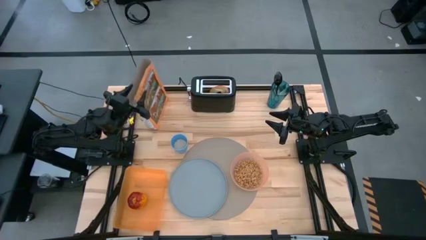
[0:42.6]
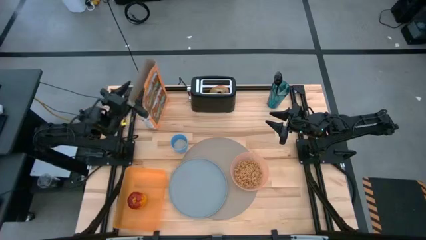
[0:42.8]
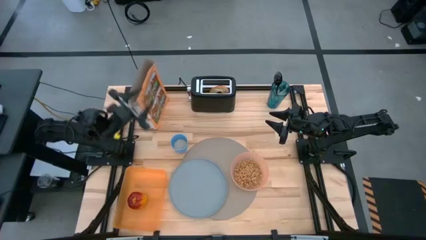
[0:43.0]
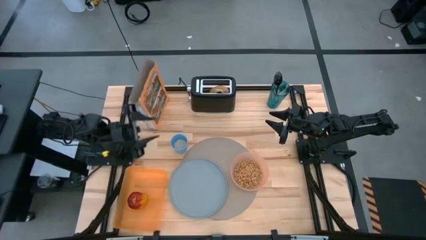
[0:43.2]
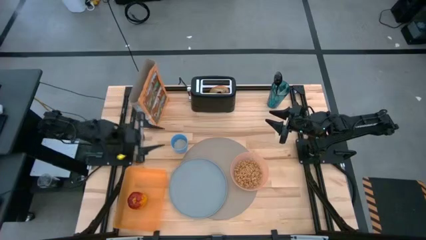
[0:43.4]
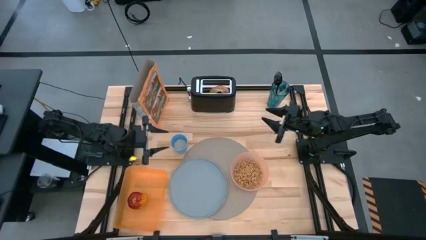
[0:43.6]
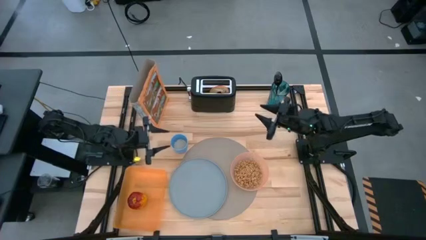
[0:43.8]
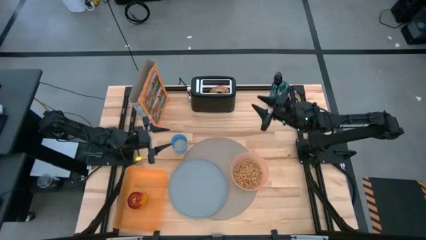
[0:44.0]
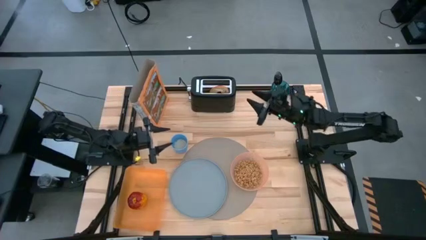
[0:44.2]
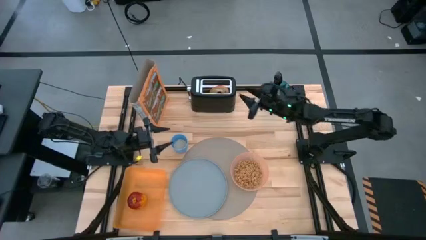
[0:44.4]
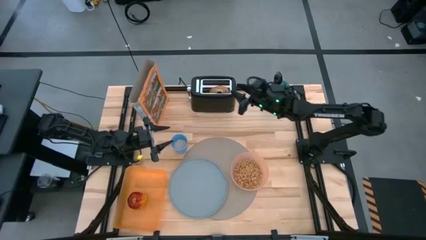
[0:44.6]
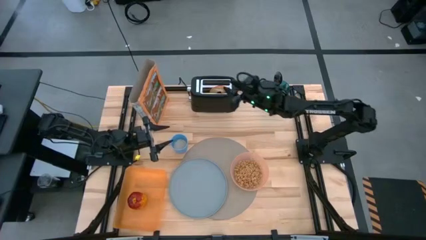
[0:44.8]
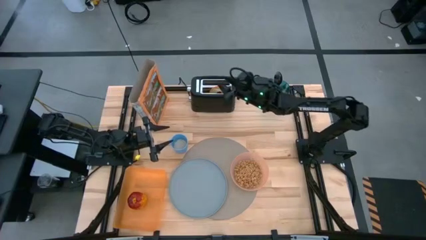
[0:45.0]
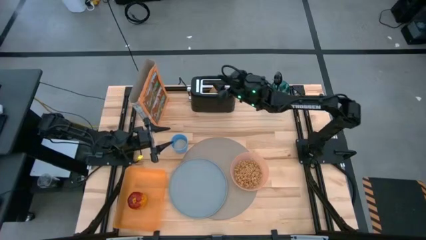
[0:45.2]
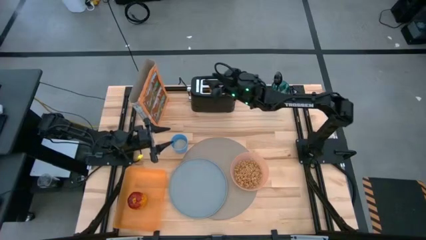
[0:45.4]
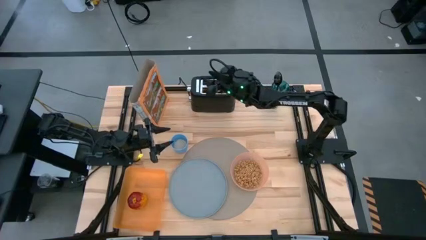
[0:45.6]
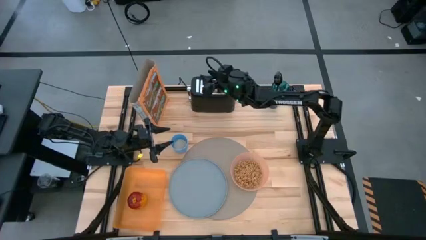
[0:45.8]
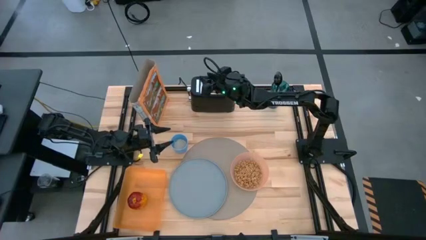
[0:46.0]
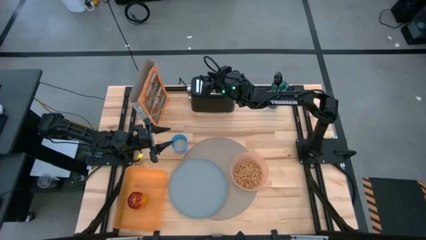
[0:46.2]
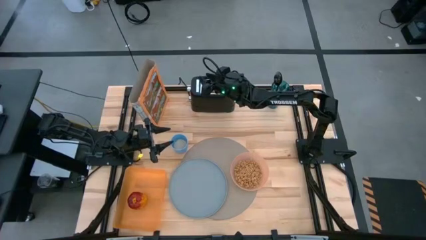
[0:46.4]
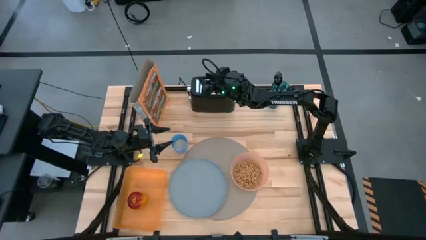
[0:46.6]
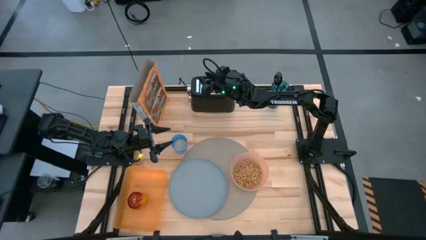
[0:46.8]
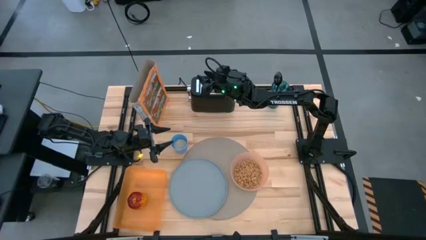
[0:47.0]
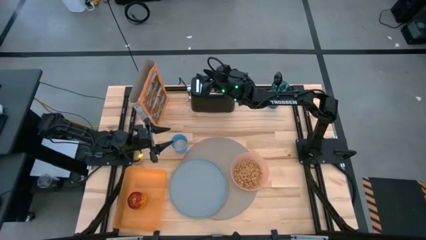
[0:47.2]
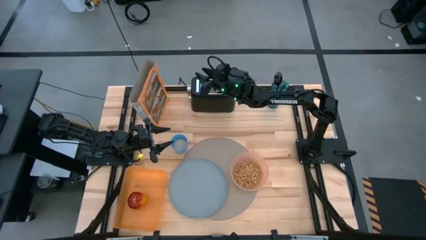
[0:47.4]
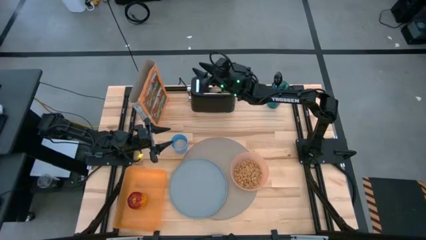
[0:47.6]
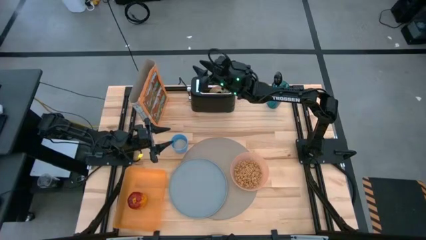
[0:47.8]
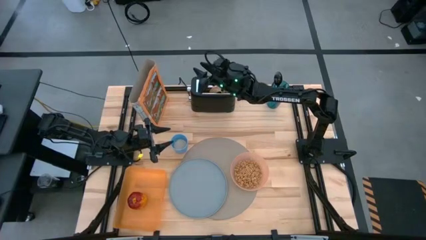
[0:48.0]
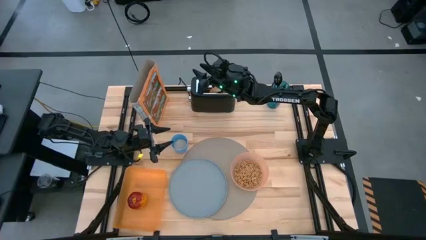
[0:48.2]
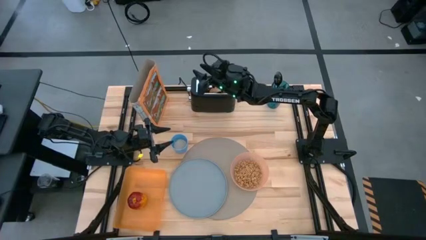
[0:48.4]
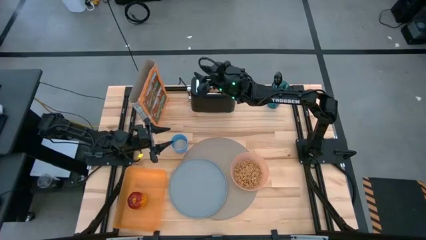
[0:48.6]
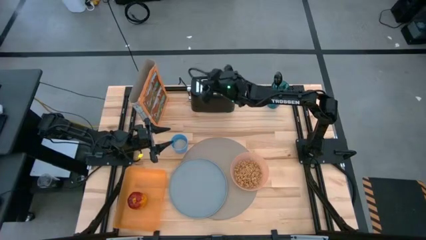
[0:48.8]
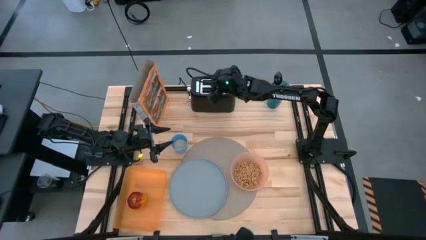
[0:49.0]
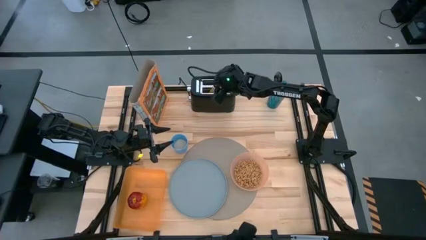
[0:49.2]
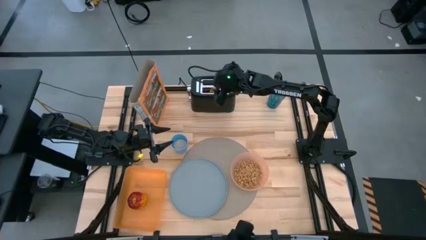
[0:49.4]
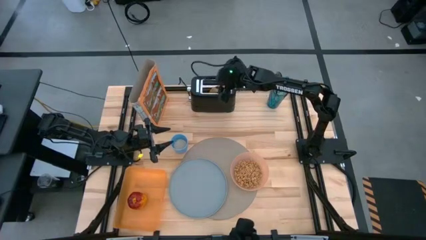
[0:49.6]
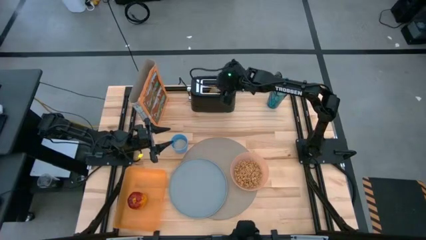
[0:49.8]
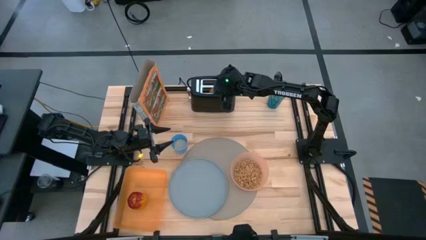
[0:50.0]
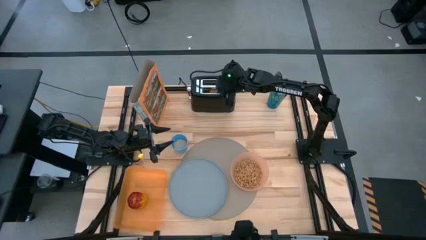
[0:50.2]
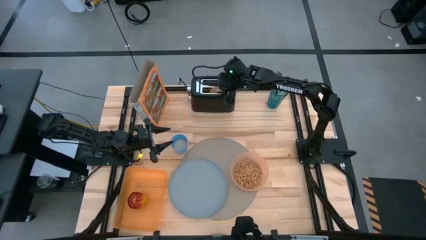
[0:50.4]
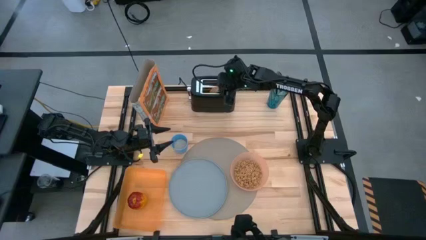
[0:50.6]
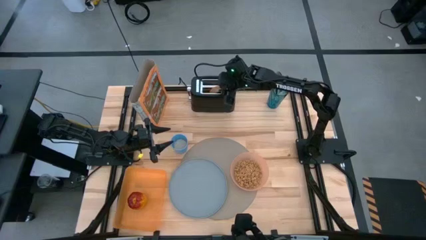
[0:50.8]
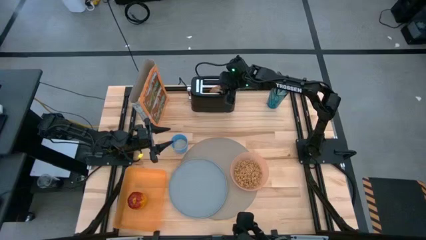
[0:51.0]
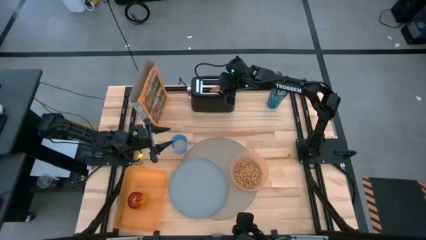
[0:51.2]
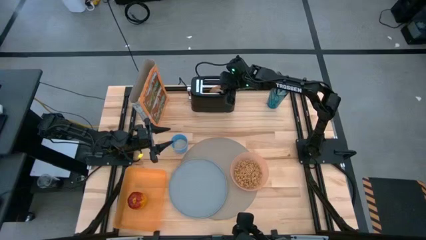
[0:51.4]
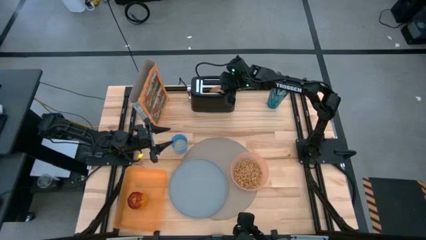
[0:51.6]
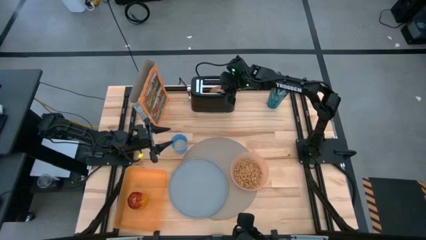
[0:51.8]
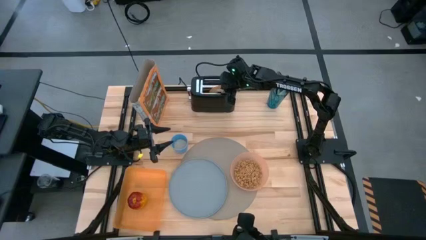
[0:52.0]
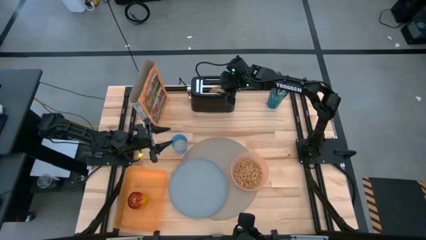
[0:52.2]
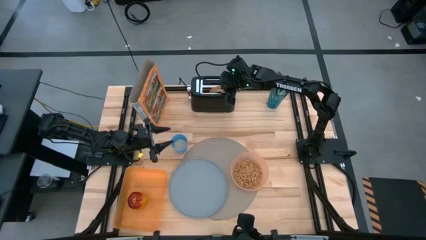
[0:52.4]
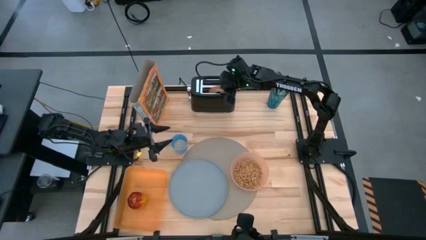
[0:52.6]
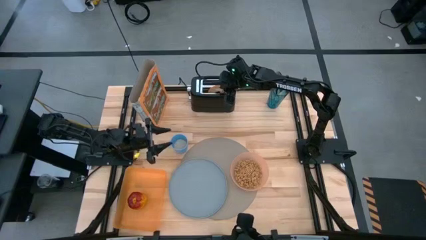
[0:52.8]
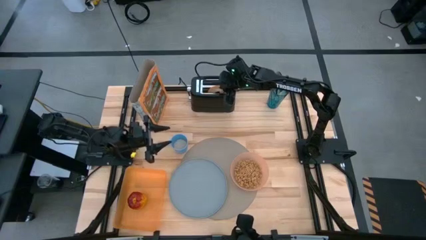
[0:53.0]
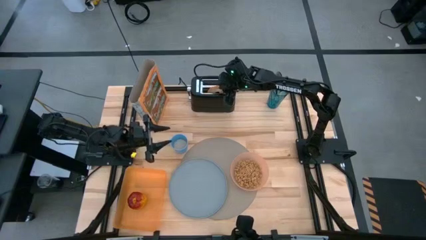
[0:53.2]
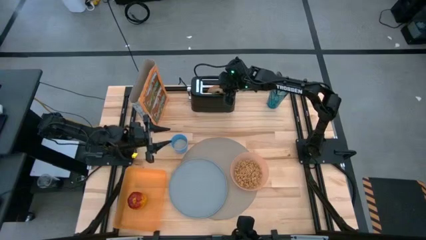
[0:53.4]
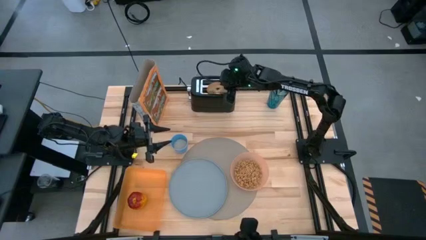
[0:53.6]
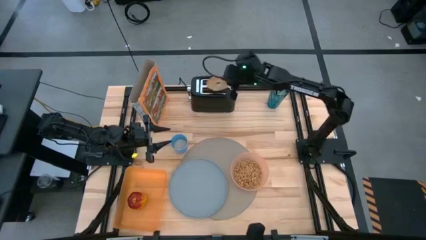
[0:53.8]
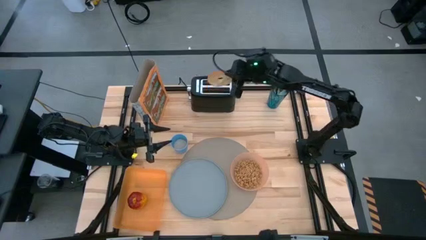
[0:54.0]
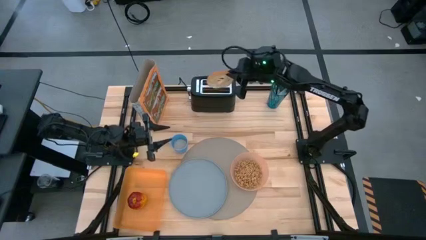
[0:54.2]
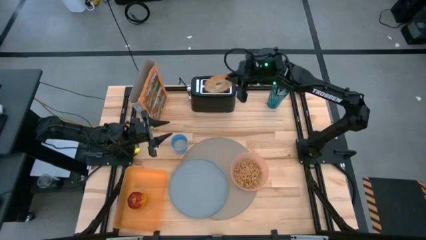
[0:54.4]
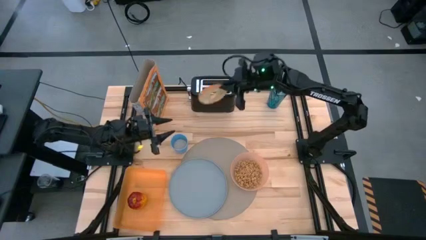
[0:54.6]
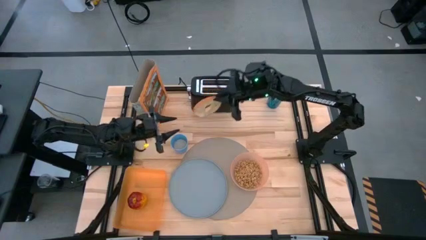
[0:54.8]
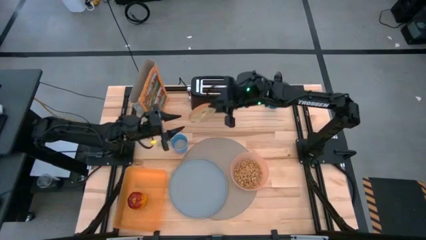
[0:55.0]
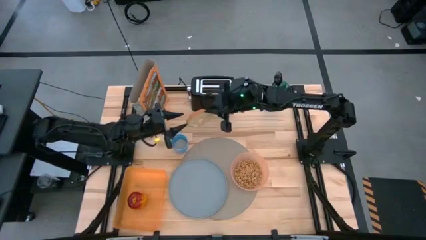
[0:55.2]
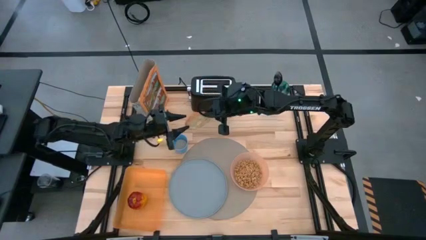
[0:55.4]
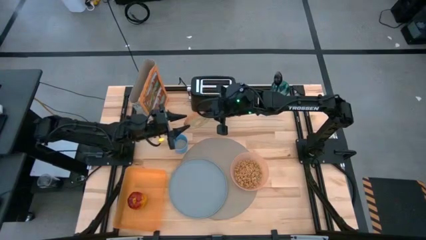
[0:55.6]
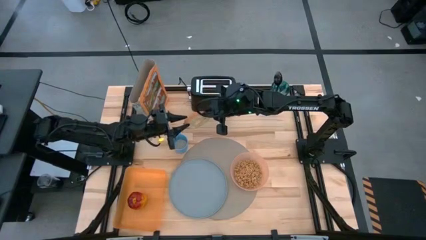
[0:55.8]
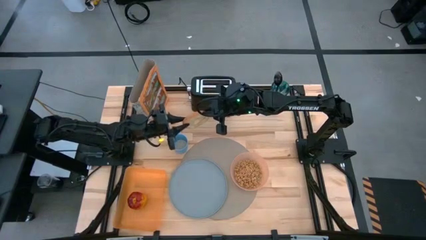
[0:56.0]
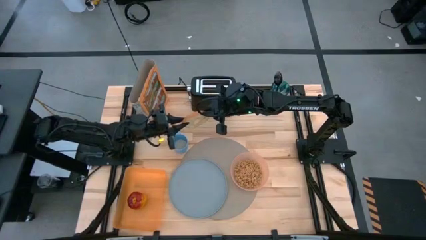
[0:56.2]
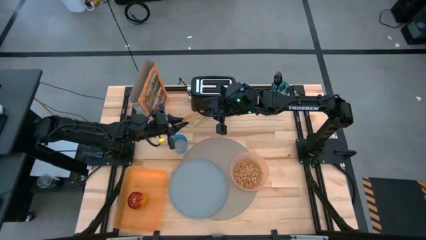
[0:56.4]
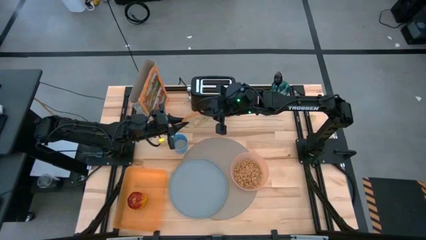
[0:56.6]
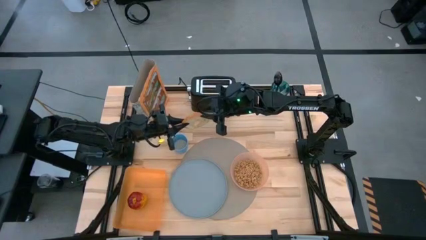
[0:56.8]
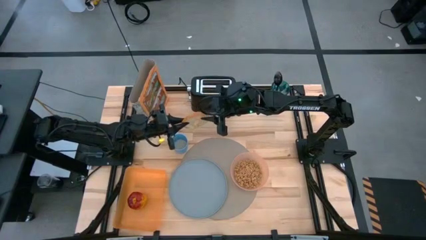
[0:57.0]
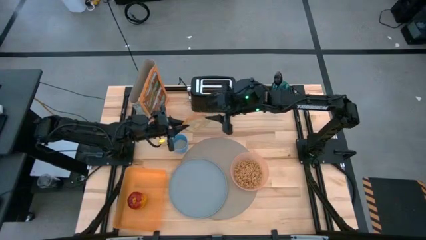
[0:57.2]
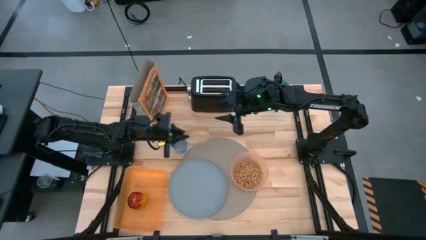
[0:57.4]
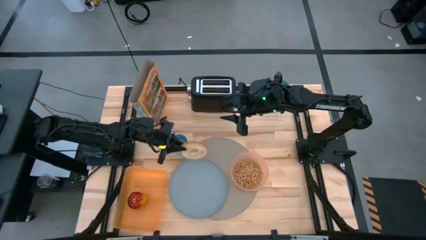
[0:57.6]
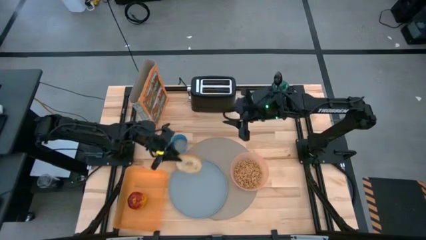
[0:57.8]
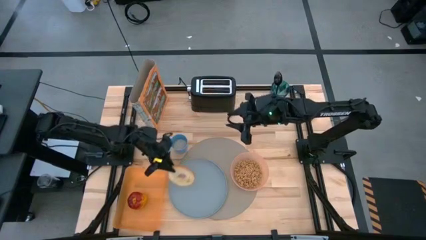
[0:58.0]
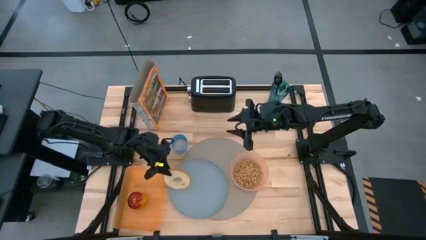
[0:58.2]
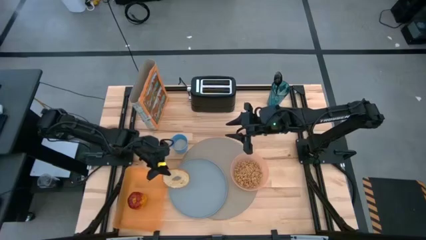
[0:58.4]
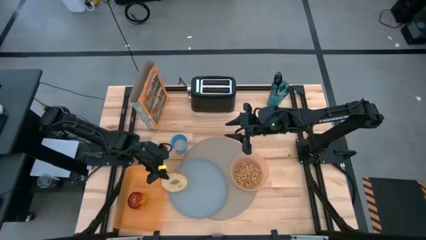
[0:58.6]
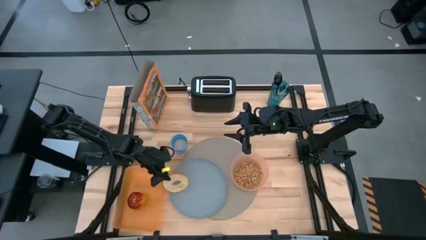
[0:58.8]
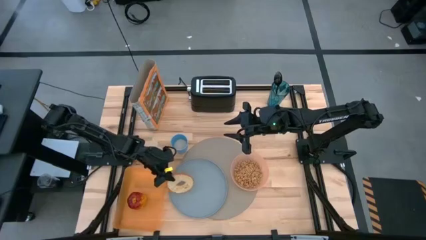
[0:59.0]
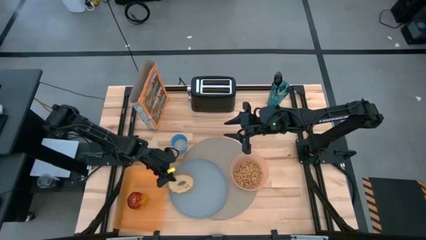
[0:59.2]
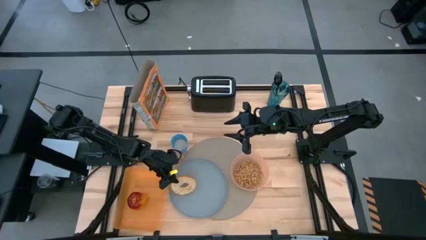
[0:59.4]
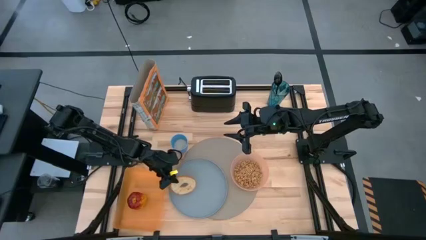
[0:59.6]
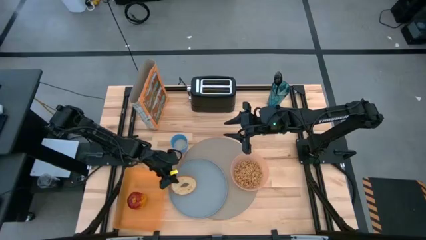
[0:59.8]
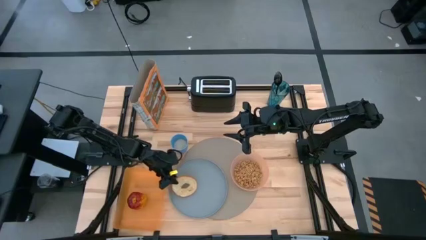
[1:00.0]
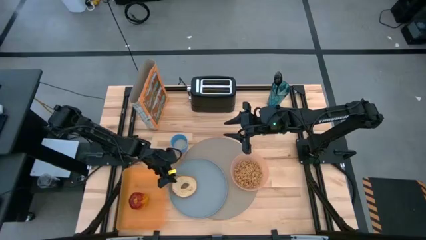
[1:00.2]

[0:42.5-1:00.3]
Task: Arrange a breakfast setting
Put the toasted bagel on the blue plate
